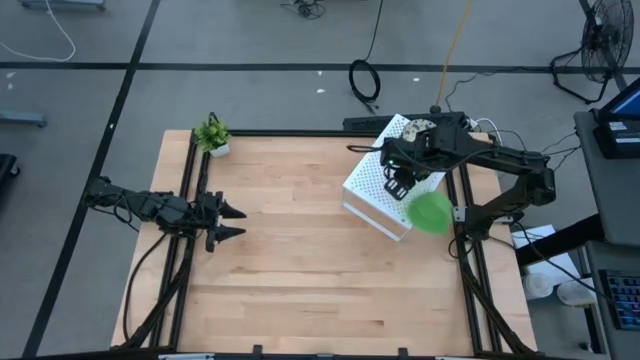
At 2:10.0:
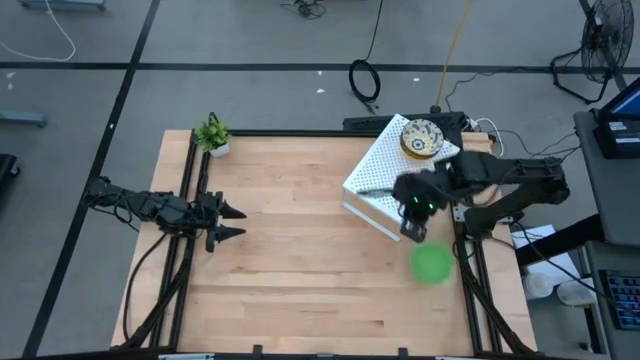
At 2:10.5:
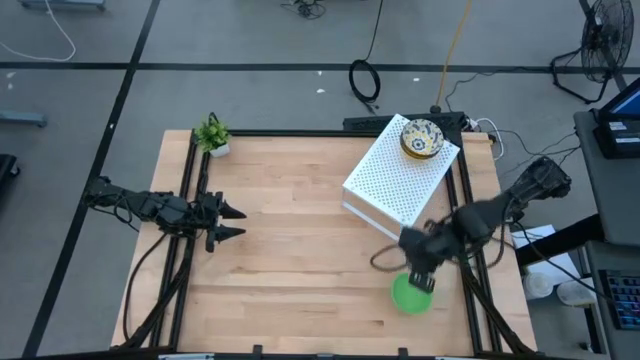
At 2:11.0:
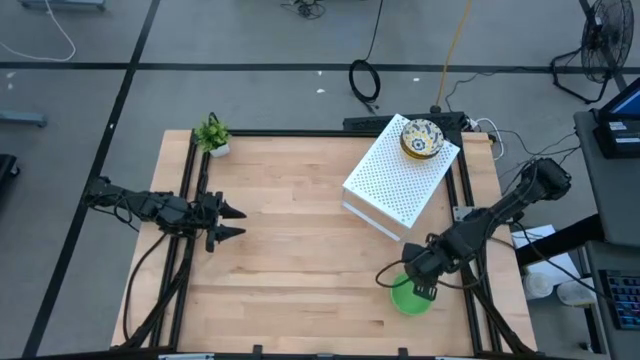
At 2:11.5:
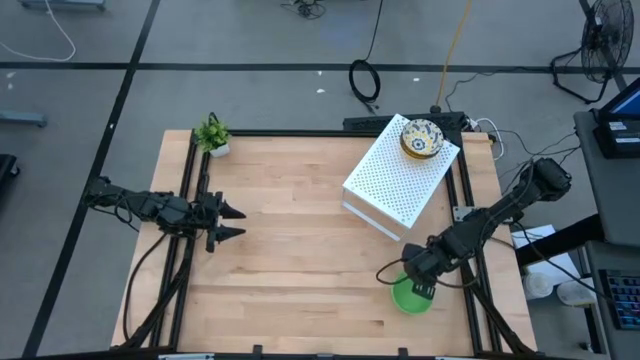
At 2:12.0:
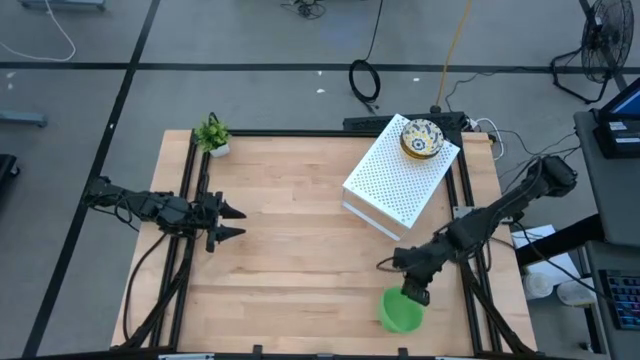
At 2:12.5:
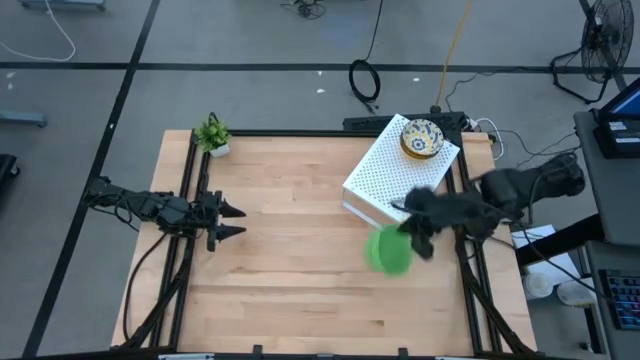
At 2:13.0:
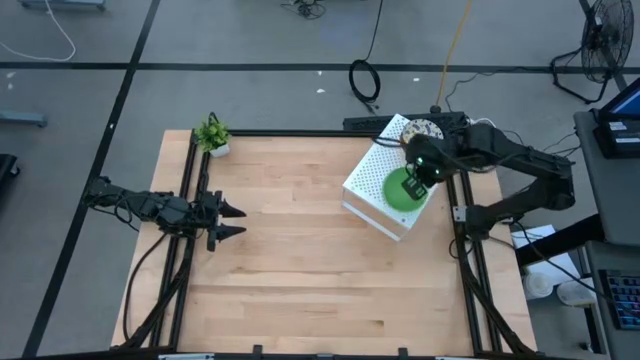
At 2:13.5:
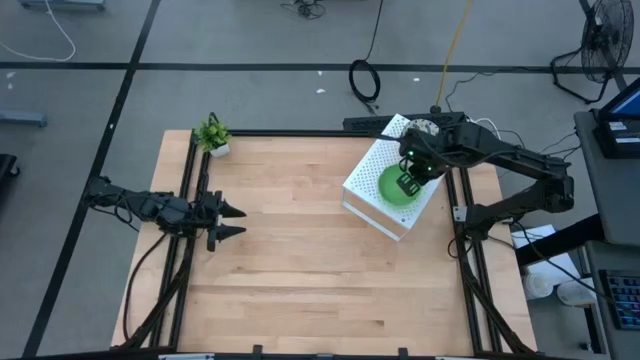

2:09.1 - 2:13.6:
Task: Pick & Place Mini bowls
Adjust the green bowls on the shelf

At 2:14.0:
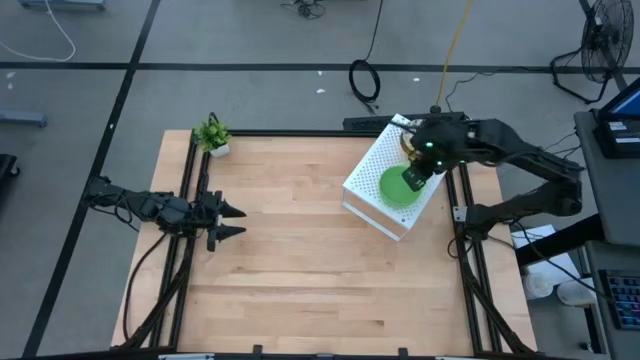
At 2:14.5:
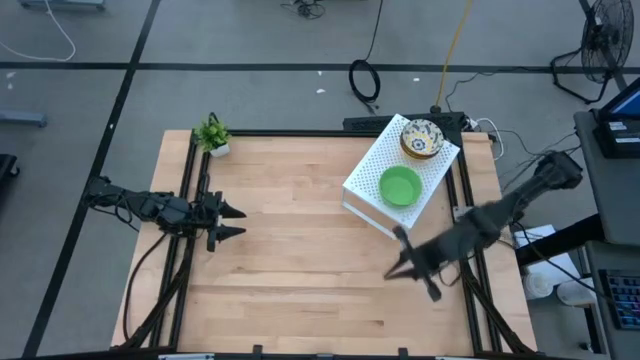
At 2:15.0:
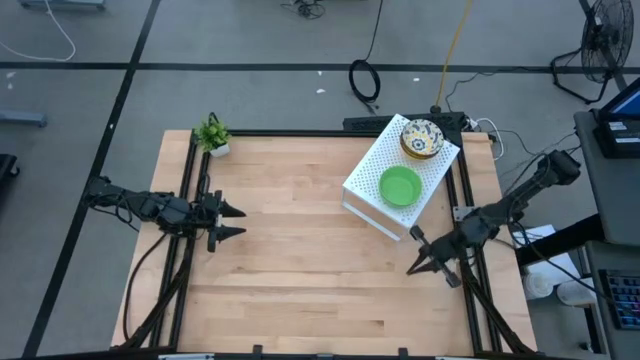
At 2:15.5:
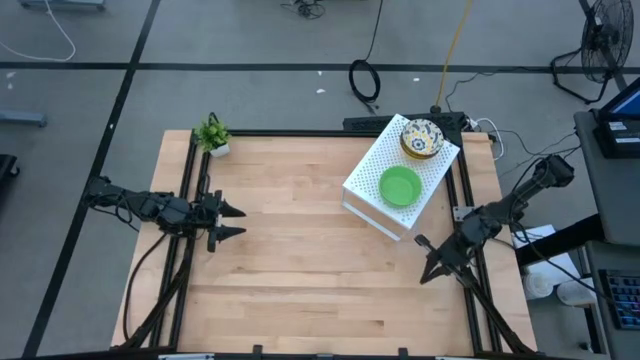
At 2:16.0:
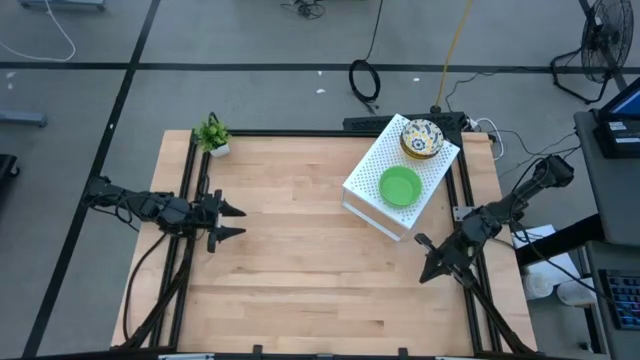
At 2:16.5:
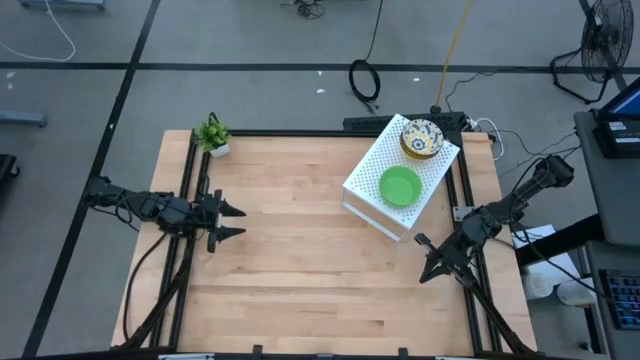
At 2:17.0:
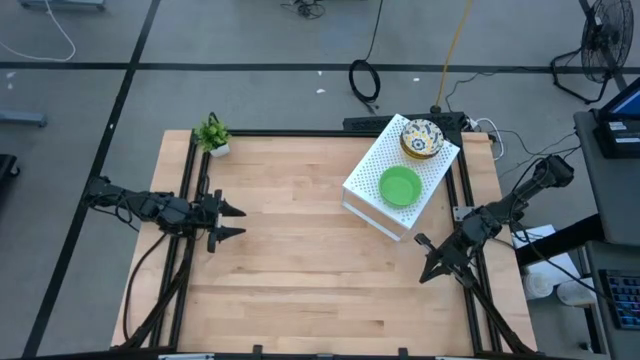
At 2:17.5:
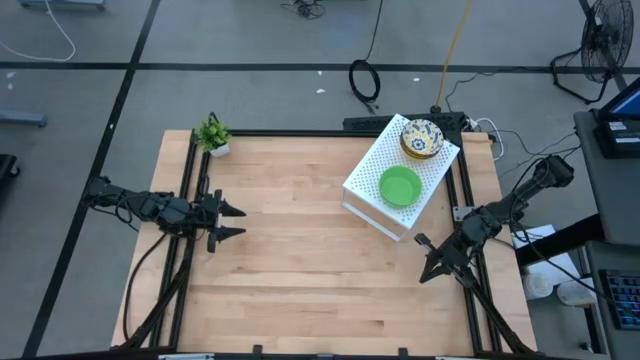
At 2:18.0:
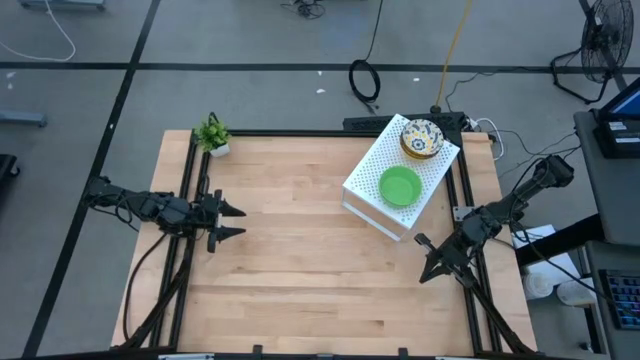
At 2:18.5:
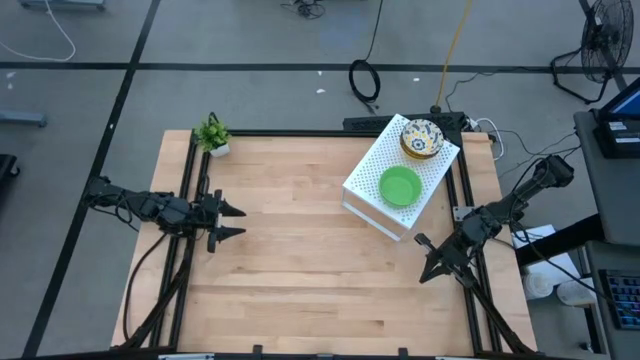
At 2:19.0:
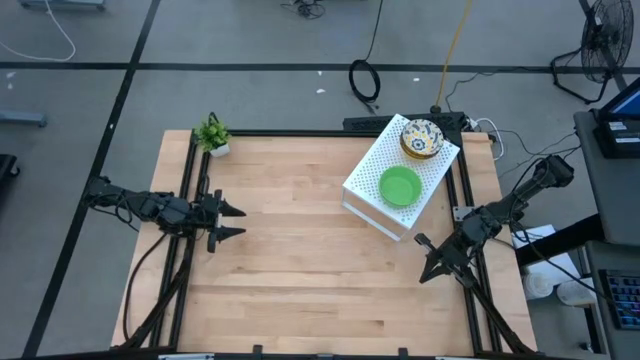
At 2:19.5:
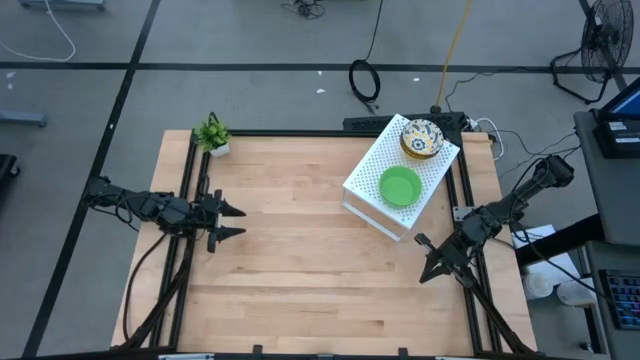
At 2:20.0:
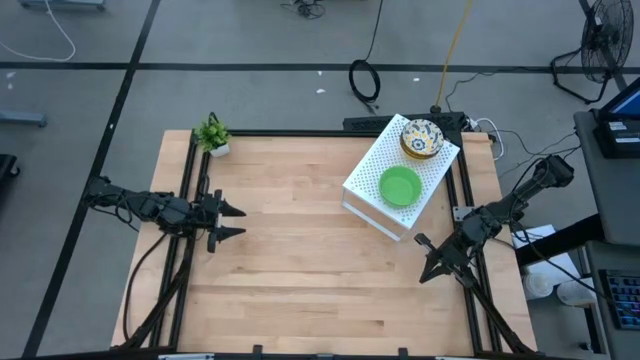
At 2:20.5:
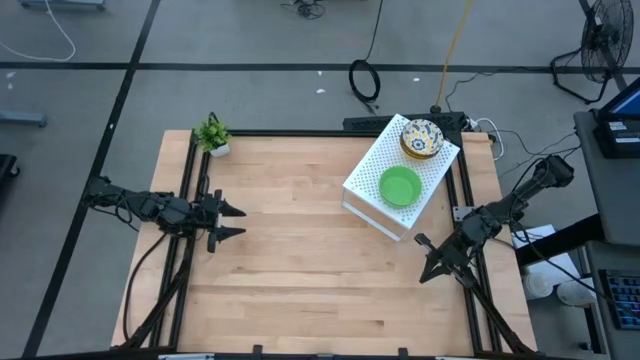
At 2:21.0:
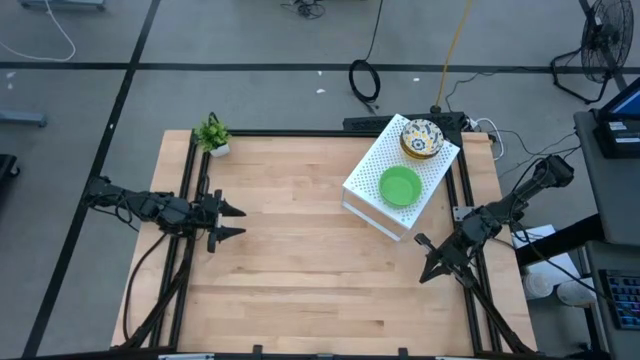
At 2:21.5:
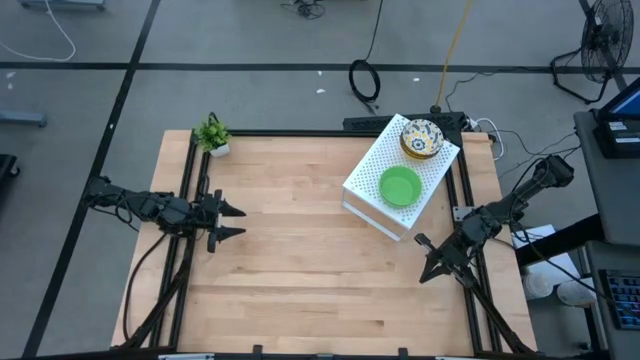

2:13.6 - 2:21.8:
Return to Home Position

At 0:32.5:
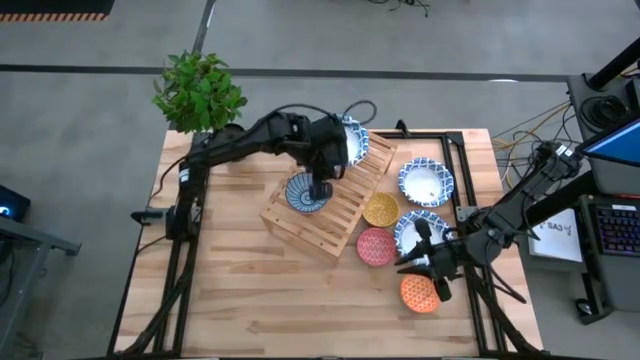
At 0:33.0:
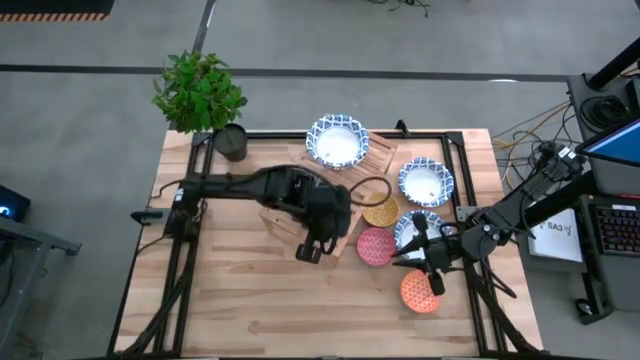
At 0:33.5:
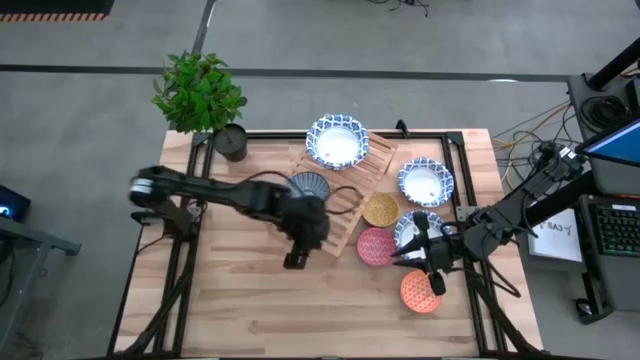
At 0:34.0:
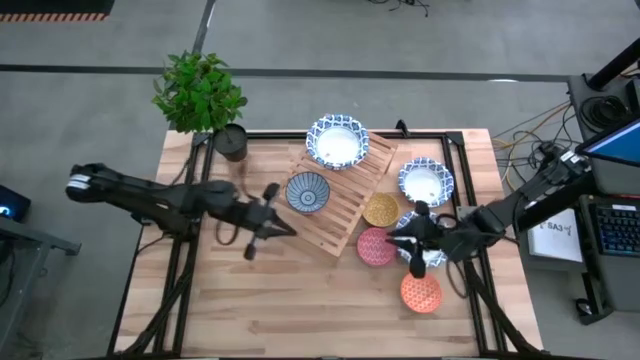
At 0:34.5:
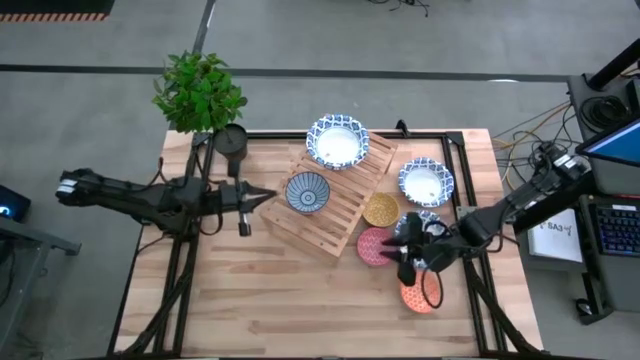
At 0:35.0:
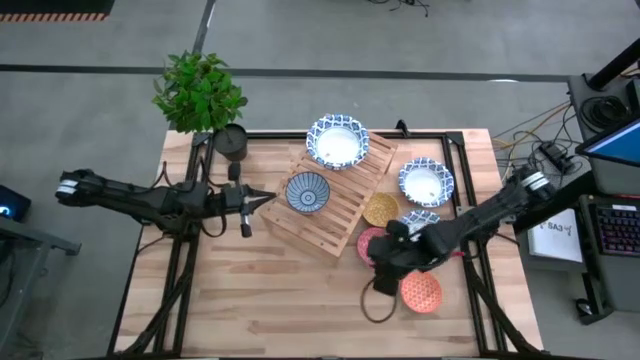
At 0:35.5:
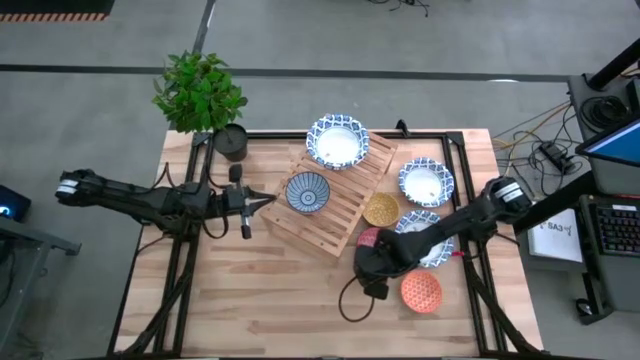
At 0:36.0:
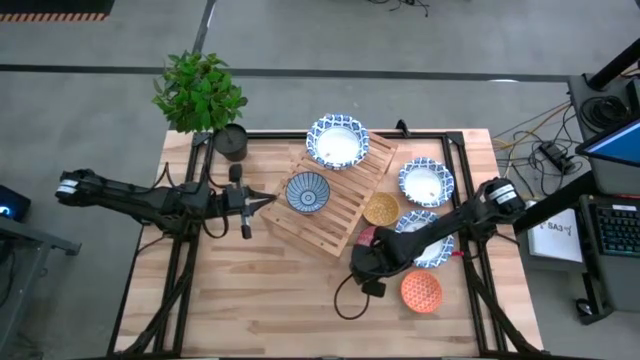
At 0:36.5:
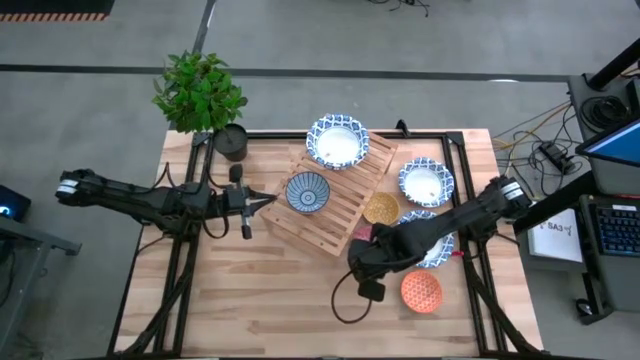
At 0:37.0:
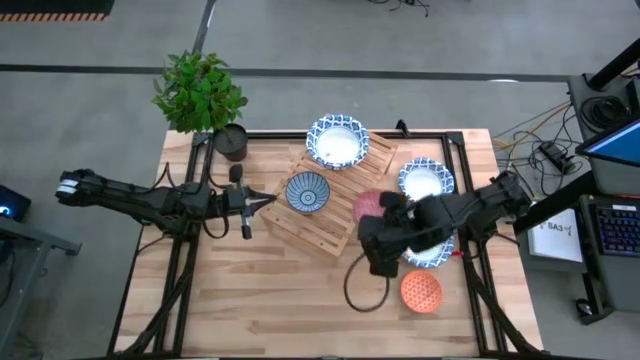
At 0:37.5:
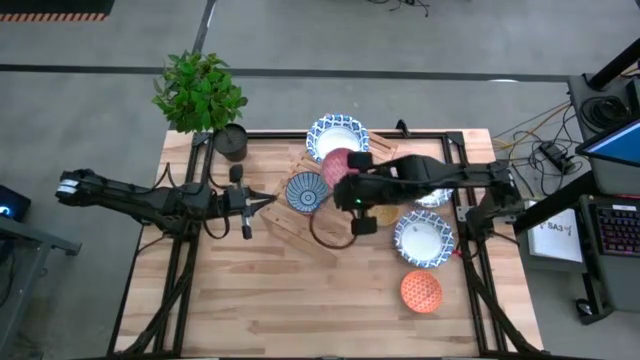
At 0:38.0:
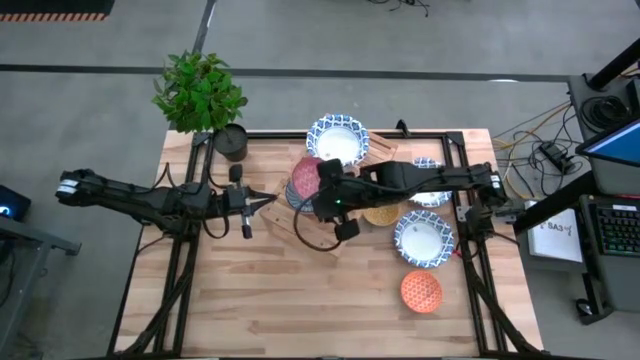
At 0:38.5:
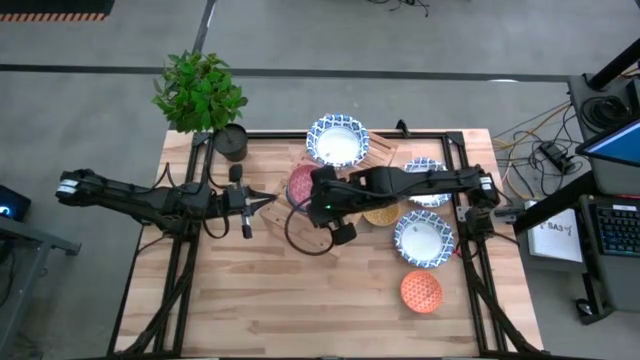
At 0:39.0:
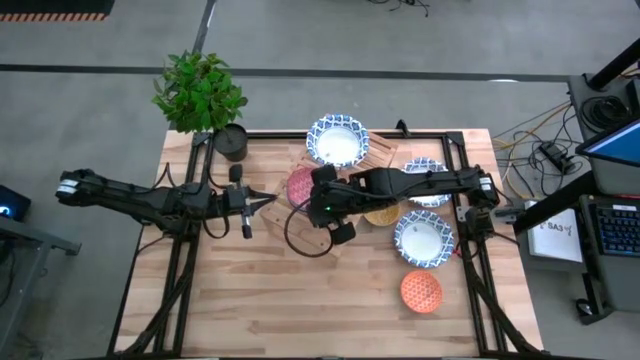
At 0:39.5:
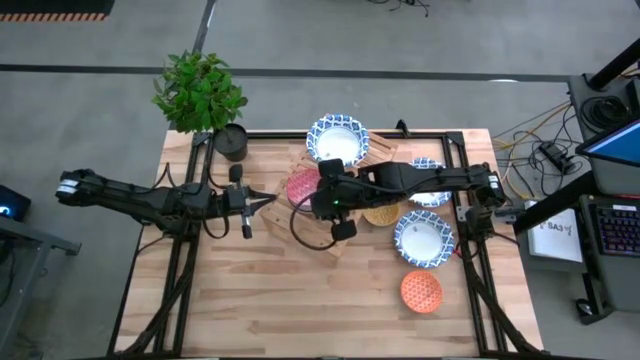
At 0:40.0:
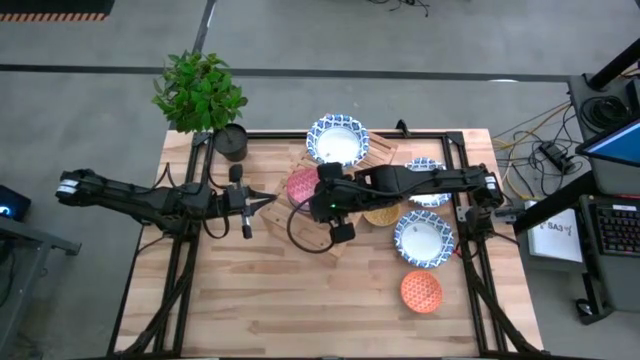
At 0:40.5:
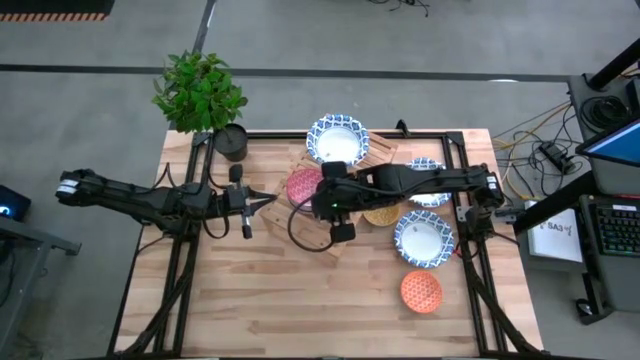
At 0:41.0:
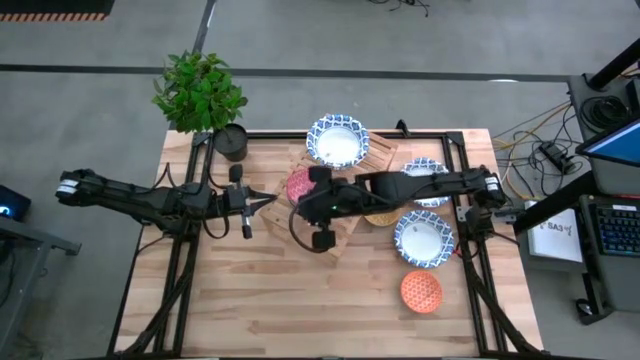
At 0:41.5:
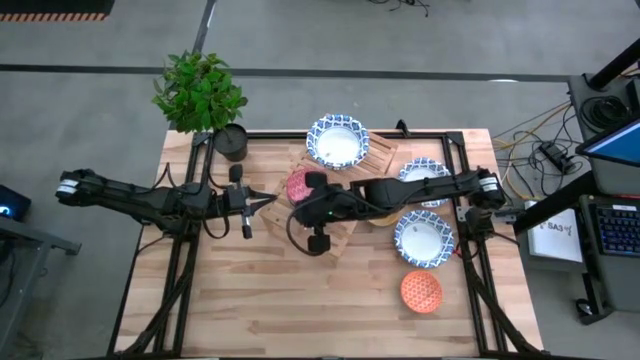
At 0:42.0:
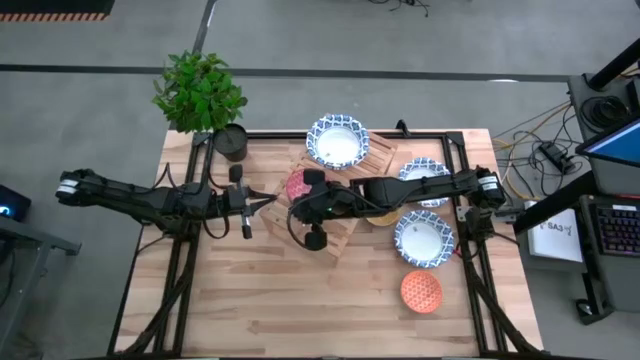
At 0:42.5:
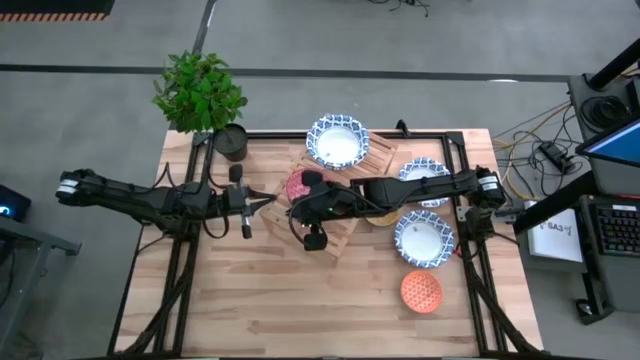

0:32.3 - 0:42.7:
Task: Place and stack bowls onto a shelf
Stack the red patterned bowl on top of the blue patterned bowl on the shelf
